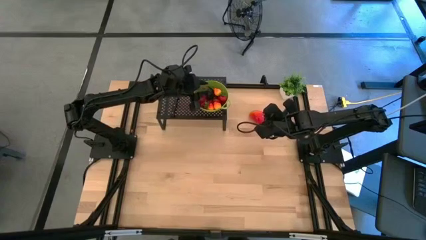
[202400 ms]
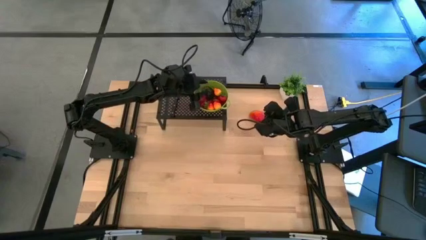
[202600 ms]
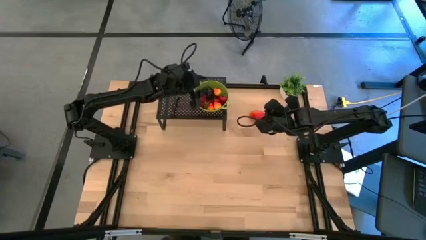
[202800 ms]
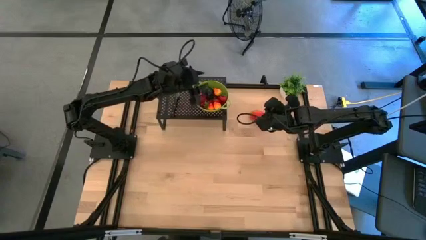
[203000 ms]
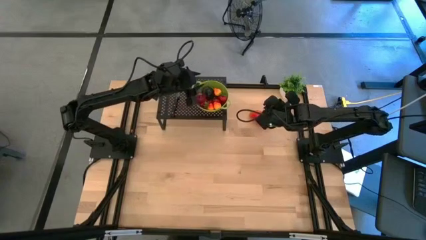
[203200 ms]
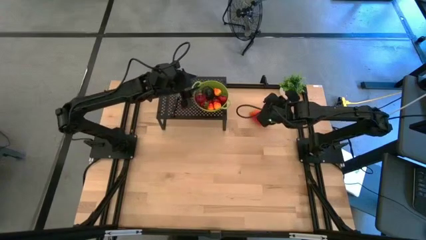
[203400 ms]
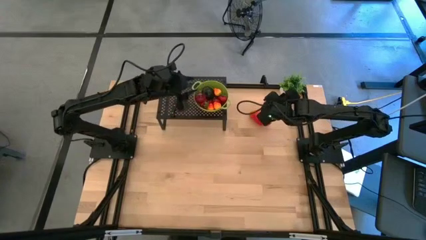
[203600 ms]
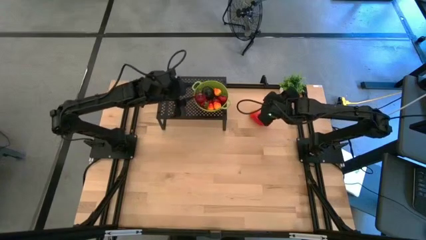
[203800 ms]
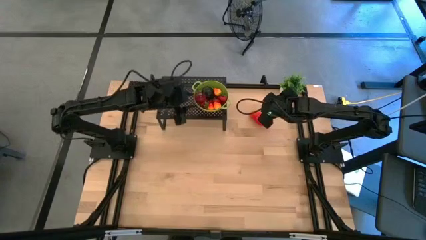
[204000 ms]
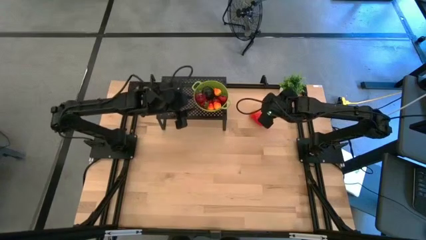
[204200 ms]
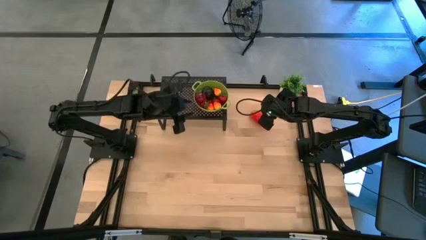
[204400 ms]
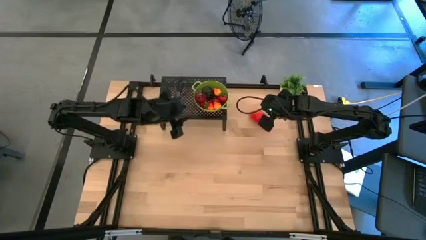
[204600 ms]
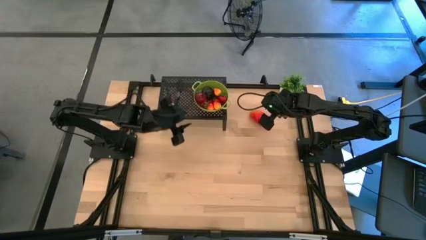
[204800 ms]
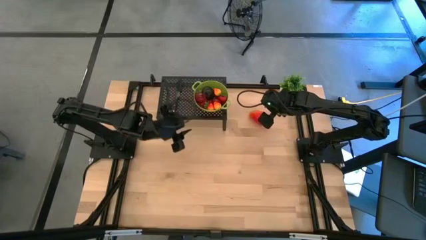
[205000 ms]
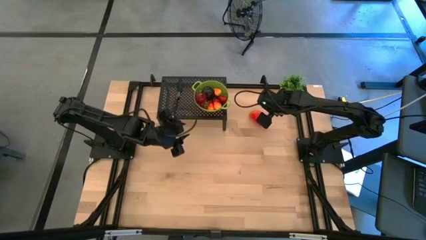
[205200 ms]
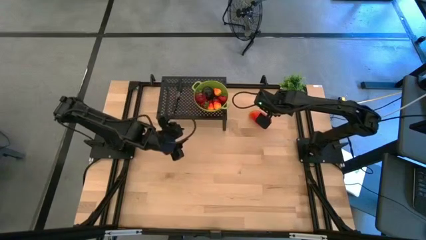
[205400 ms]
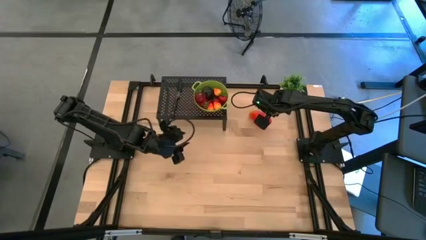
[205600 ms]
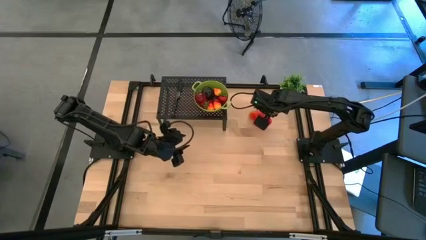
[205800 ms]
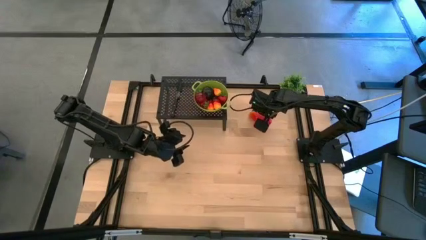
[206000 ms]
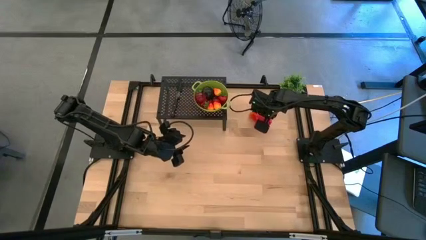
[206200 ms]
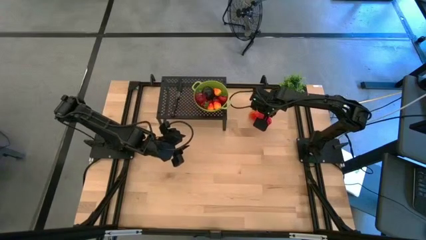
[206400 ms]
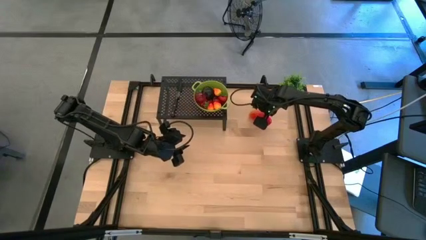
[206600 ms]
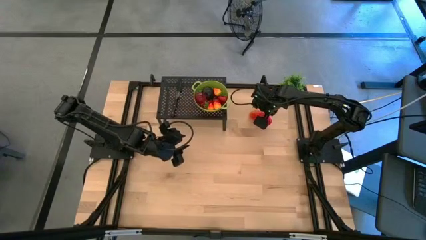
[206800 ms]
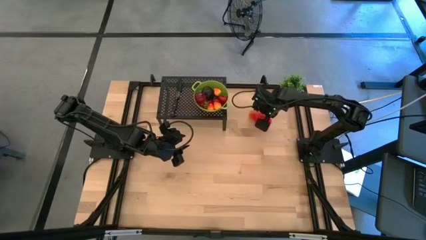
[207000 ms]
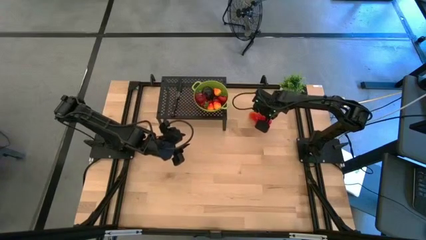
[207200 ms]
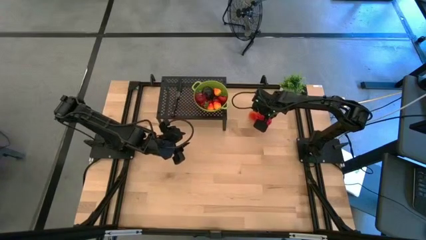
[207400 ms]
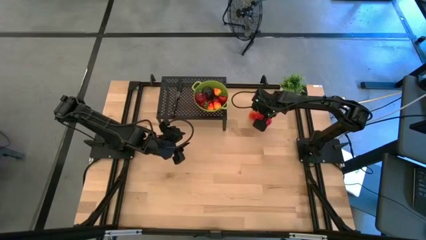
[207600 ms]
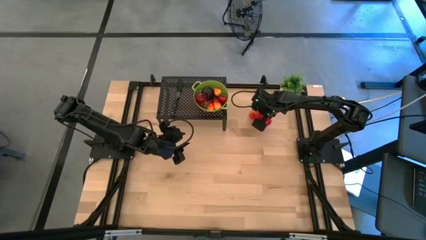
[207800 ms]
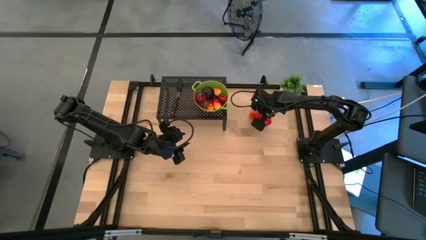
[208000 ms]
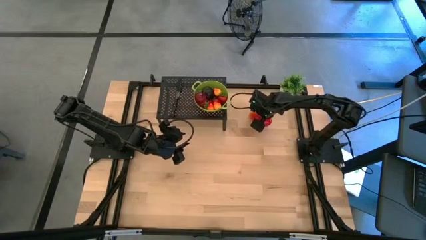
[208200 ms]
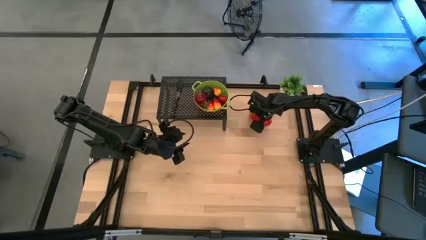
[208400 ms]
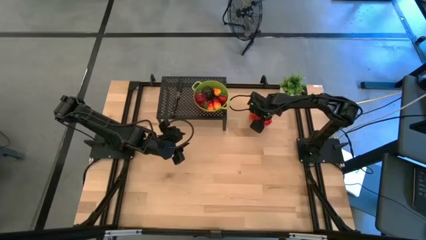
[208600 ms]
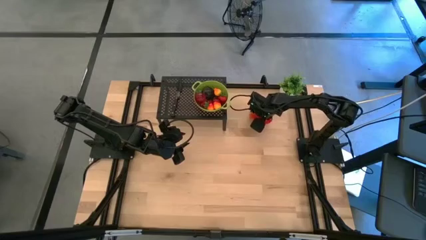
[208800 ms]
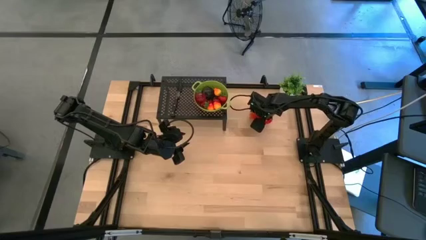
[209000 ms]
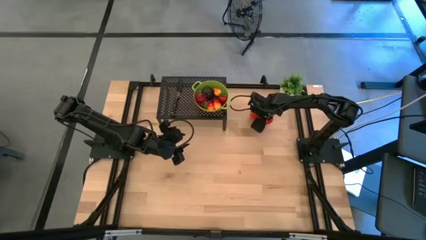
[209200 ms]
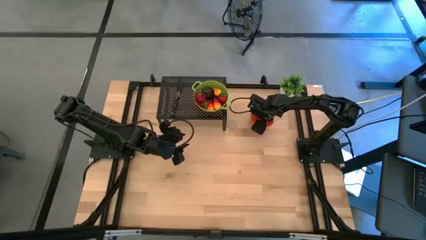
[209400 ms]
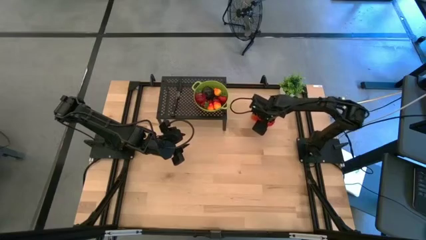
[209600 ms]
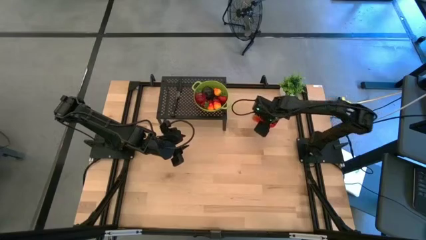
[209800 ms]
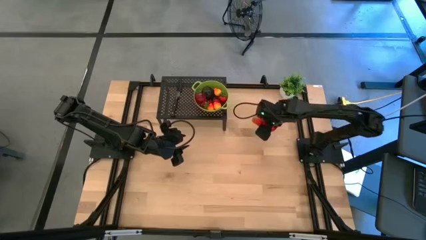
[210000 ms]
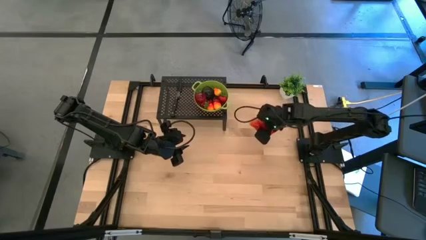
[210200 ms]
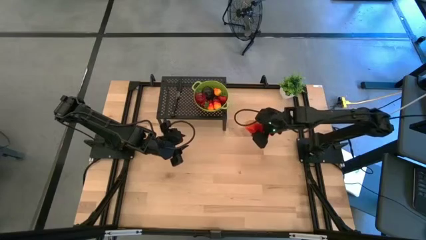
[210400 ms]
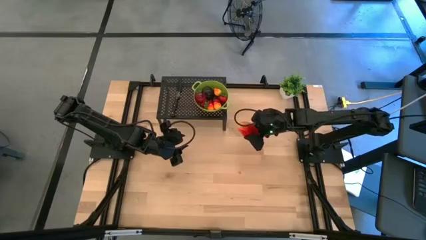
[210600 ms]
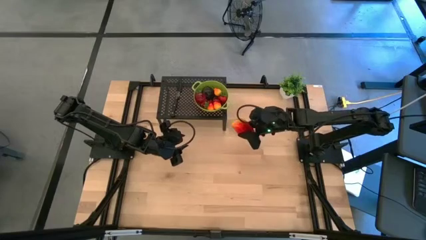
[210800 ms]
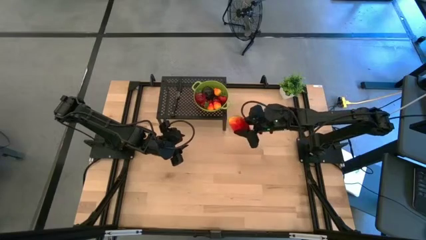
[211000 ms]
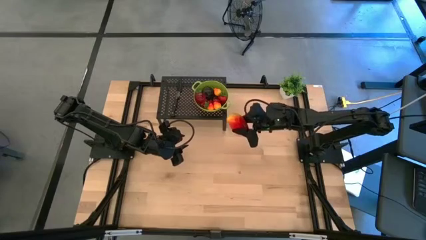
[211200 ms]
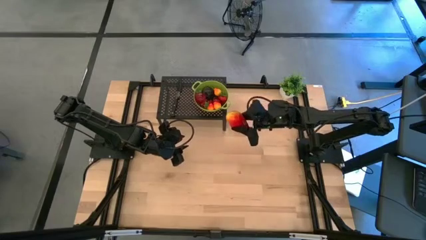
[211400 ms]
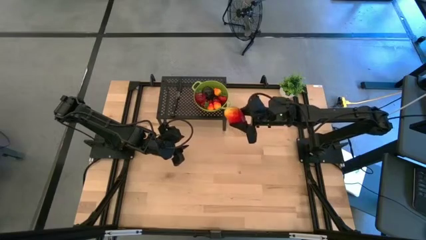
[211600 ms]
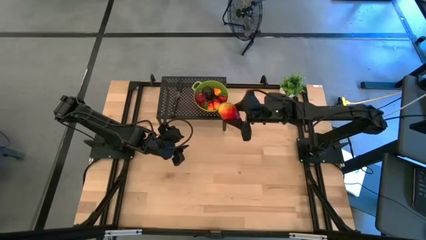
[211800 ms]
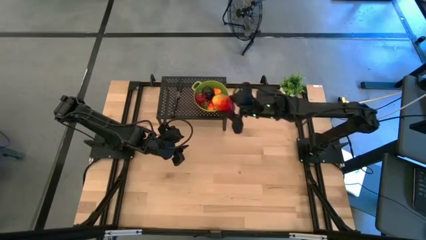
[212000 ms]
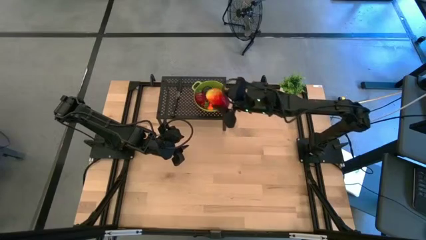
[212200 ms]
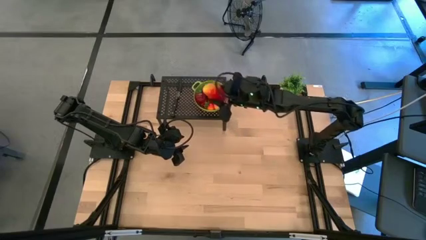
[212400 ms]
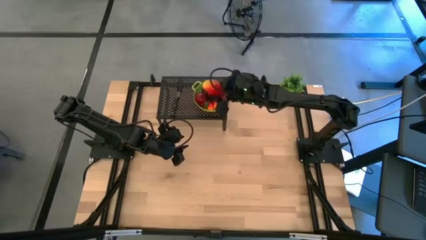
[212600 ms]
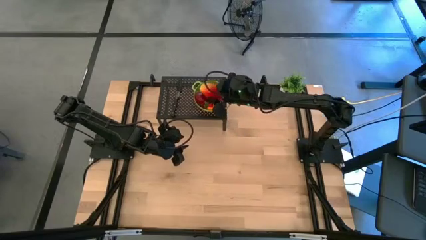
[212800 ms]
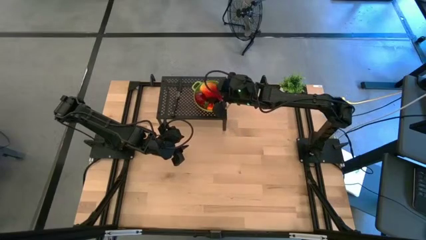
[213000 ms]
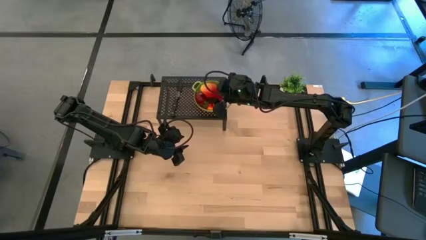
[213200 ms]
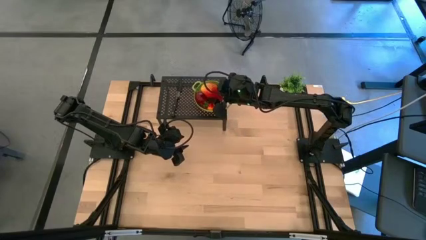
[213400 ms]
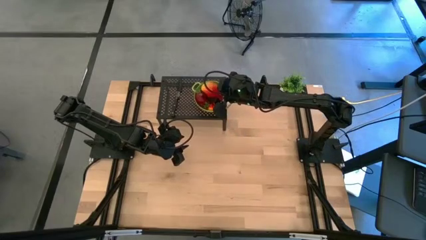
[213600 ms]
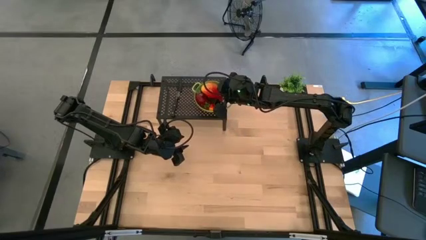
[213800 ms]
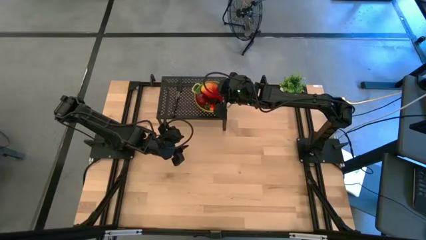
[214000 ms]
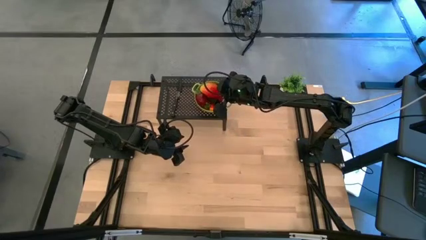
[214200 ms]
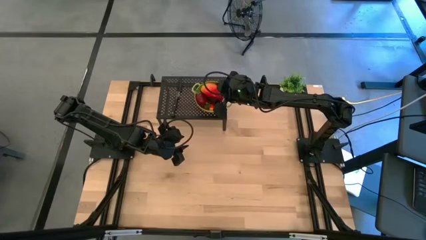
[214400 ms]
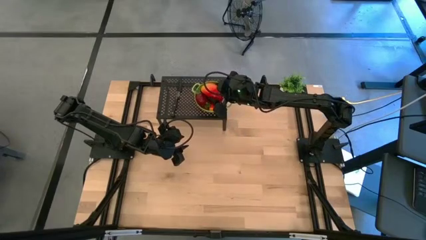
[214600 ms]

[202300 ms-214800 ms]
Task: Pick & Place Fruit
Put the red mango into the green strainer bowl on the shelf

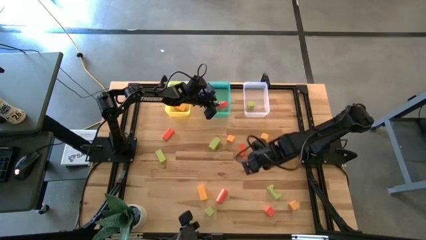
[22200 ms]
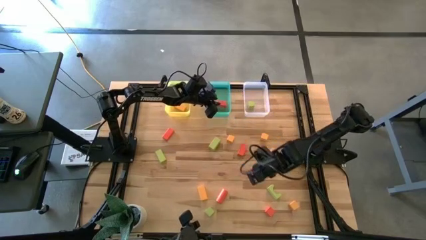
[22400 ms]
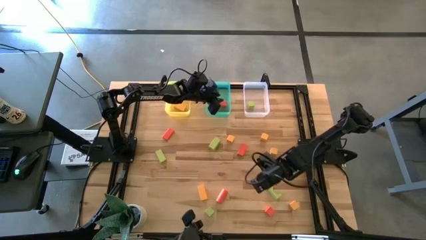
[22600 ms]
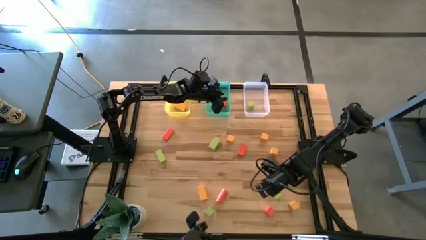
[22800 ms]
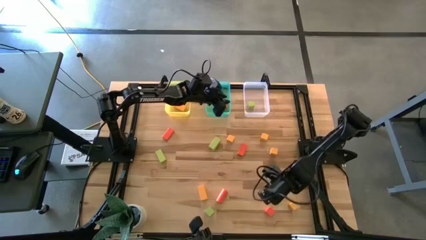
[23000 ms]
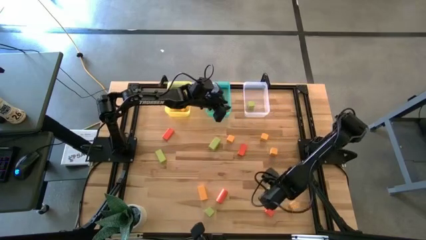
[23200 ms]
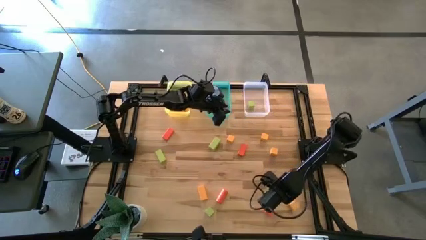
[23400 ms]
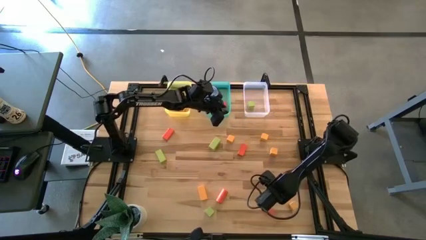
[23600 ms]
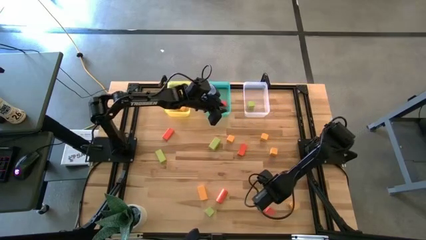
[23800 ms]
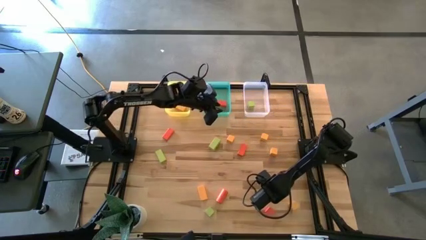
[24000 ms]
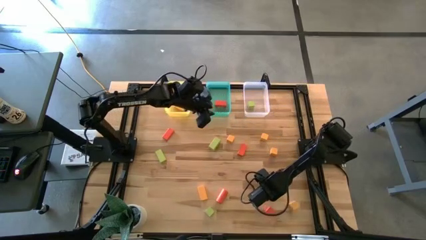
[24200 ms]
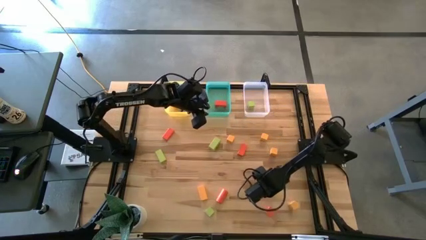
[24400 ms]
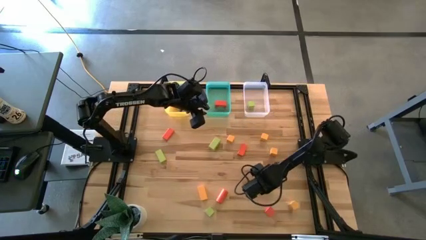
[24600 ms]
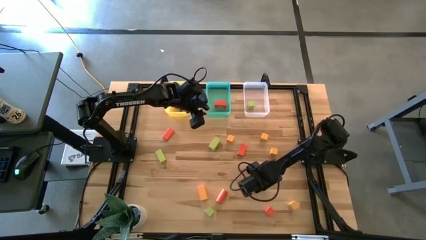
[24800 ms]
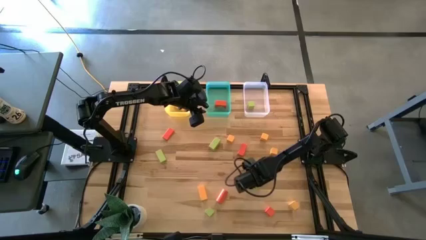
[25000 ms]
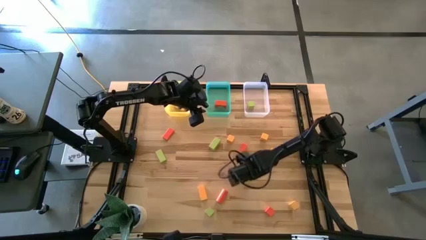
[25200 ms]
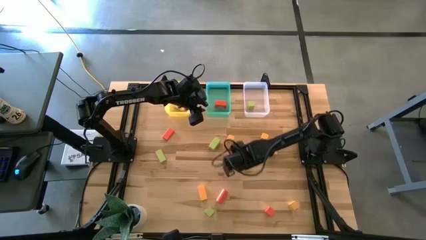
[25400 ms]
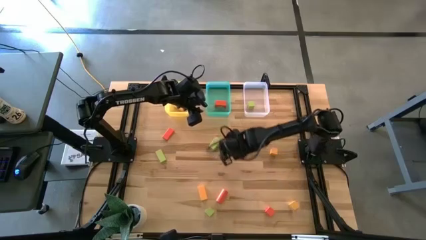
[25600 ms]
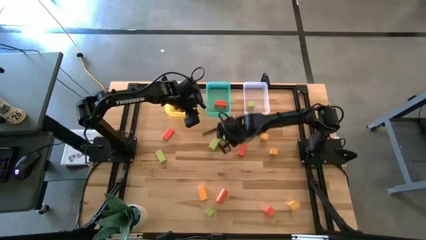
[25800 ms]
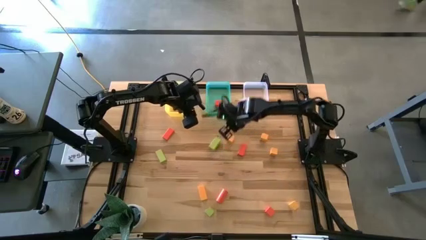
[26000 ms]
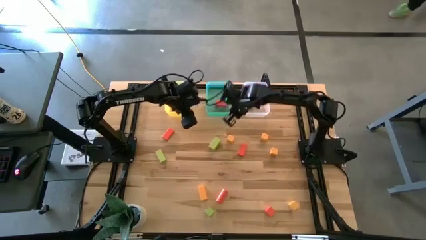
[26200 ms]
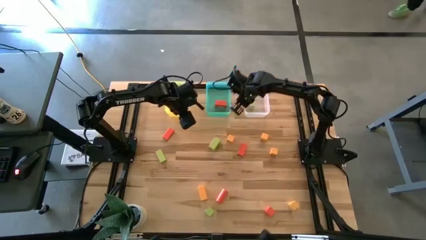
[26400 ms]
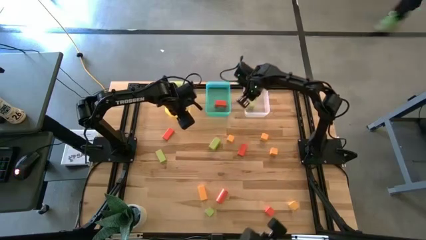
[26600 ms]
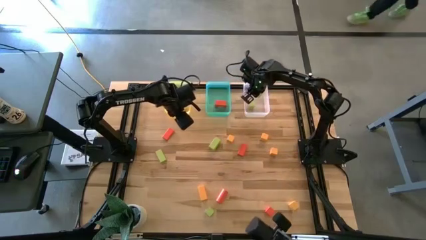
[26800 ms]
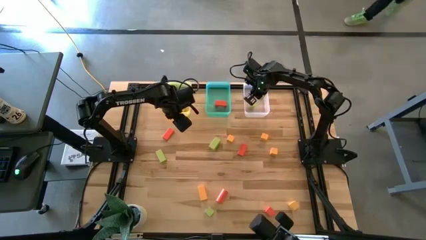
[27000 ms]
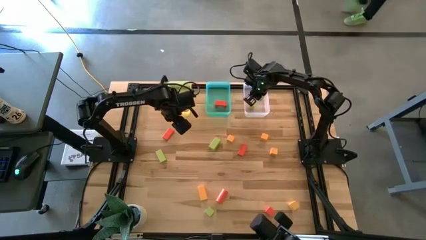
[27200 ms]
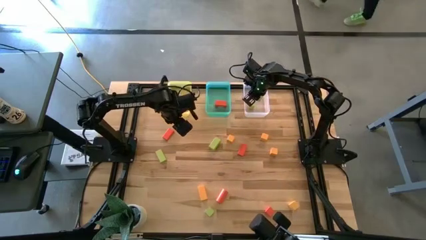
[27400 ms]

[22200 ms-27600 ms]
Task: Sort & place blocks by color
Put the light green block into the white bin
